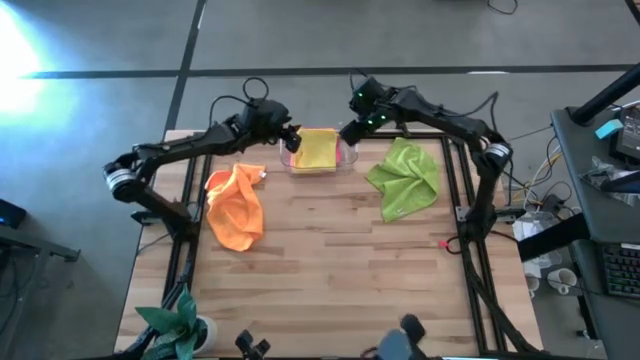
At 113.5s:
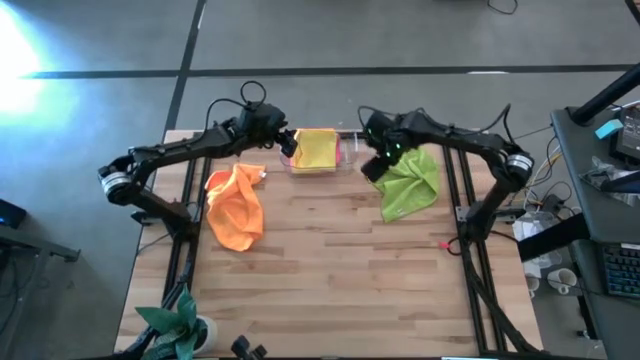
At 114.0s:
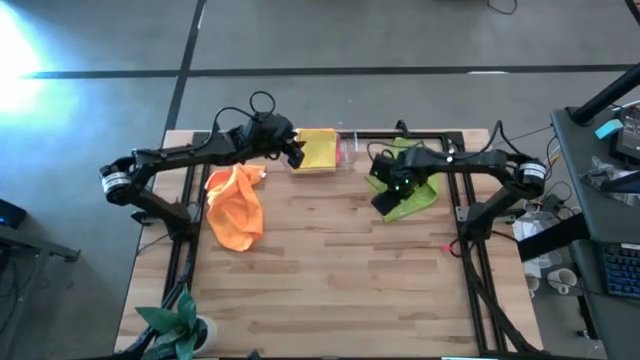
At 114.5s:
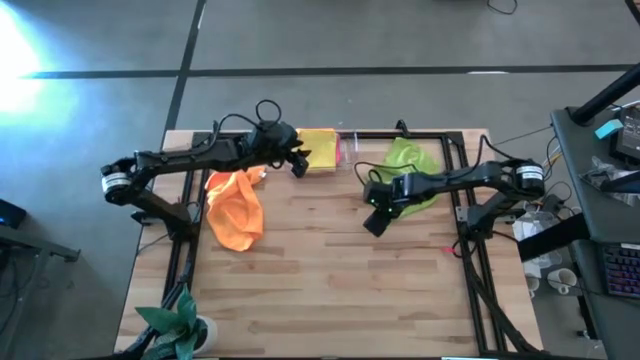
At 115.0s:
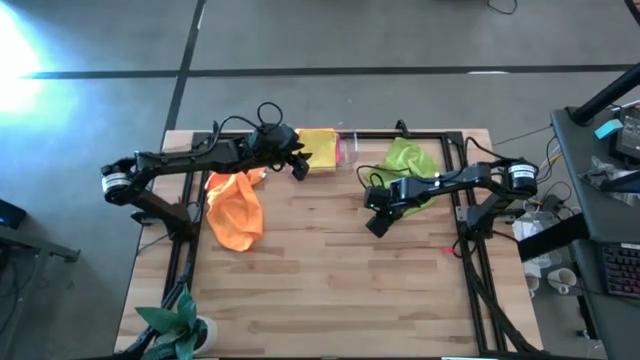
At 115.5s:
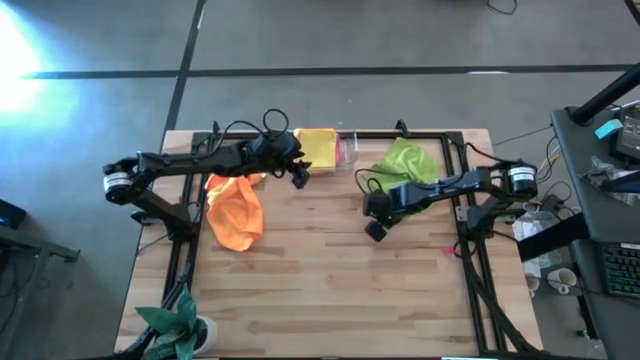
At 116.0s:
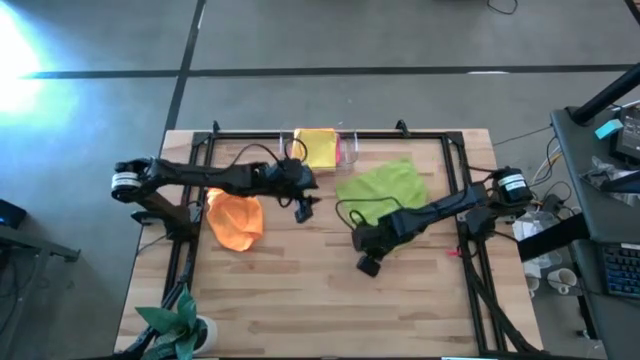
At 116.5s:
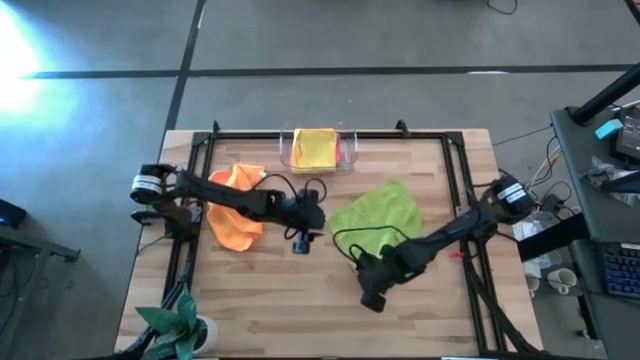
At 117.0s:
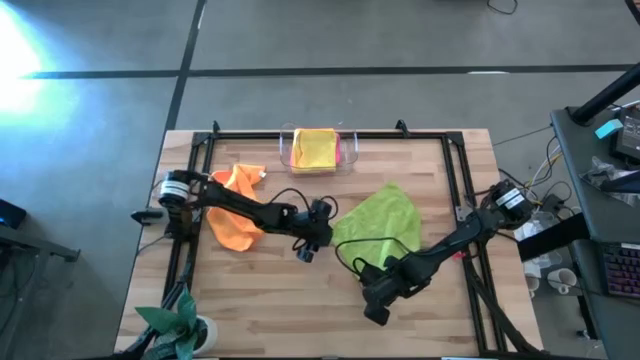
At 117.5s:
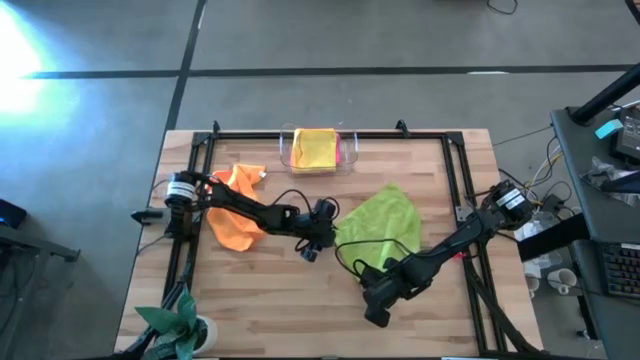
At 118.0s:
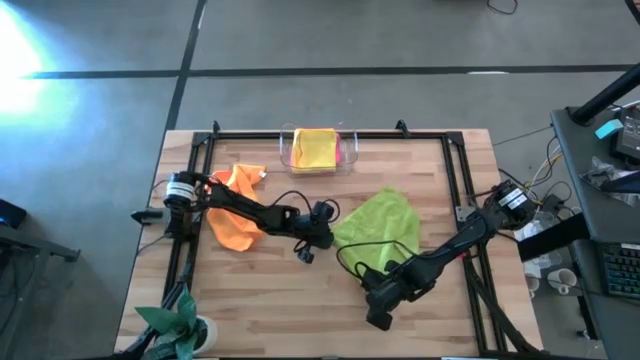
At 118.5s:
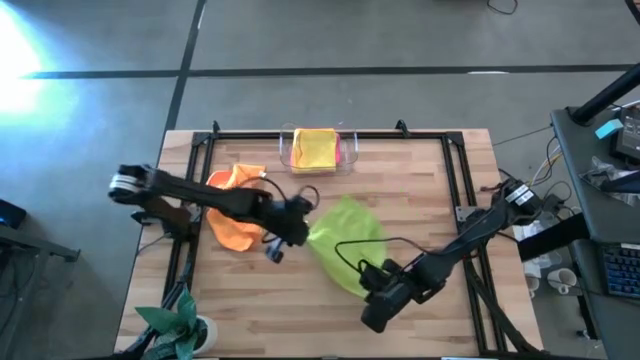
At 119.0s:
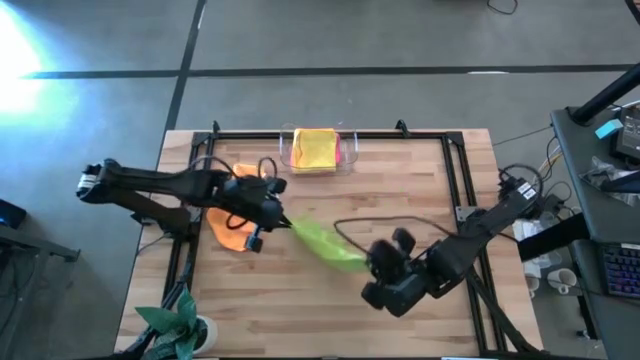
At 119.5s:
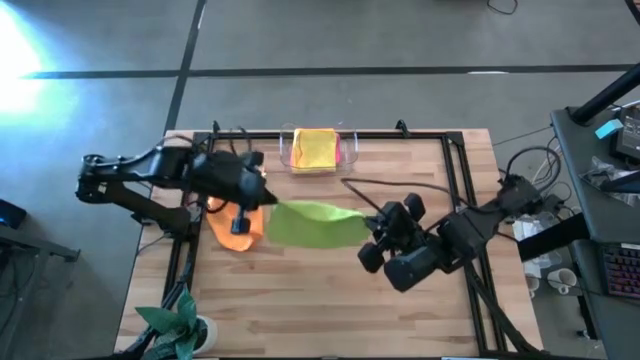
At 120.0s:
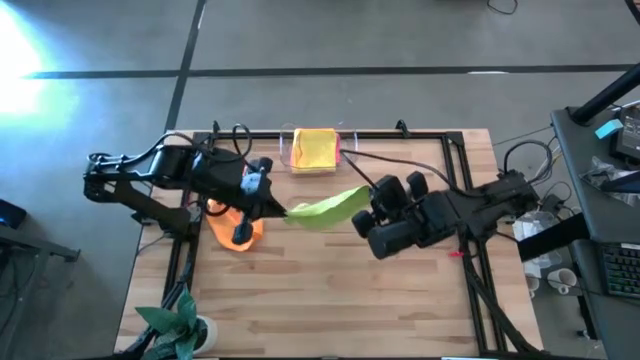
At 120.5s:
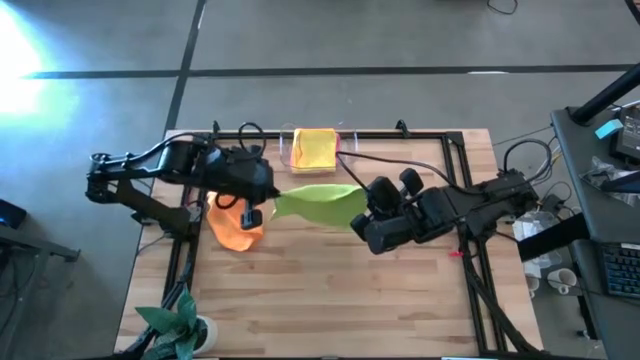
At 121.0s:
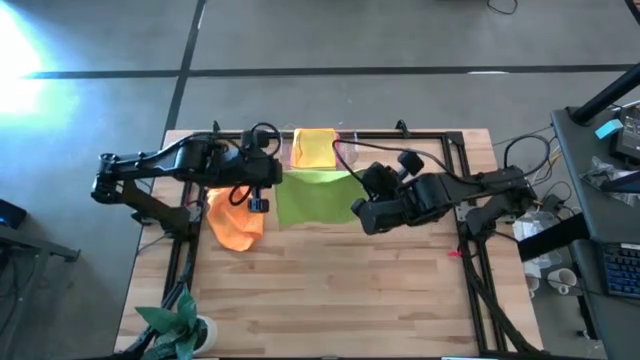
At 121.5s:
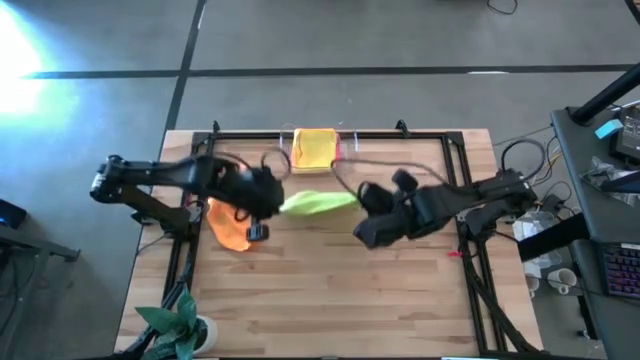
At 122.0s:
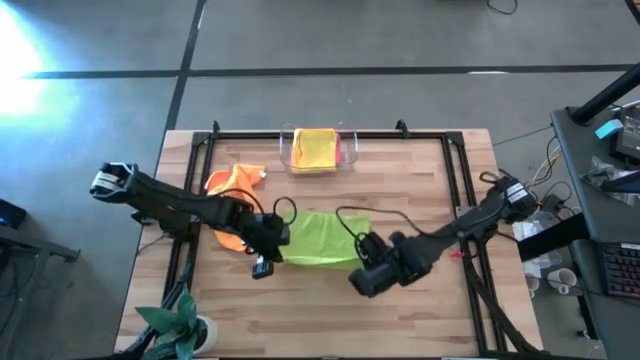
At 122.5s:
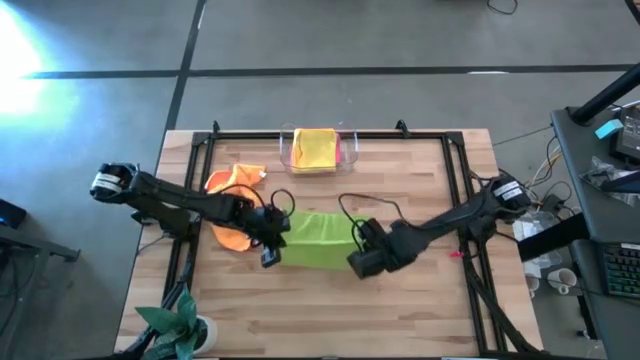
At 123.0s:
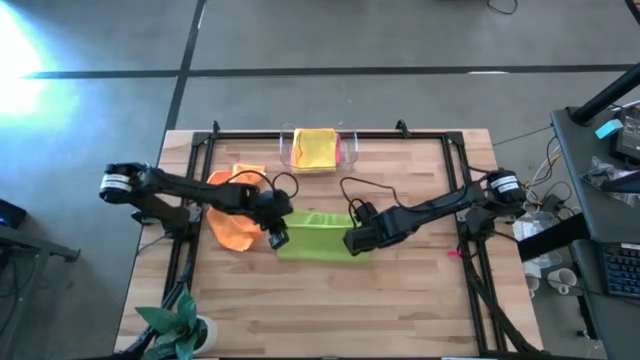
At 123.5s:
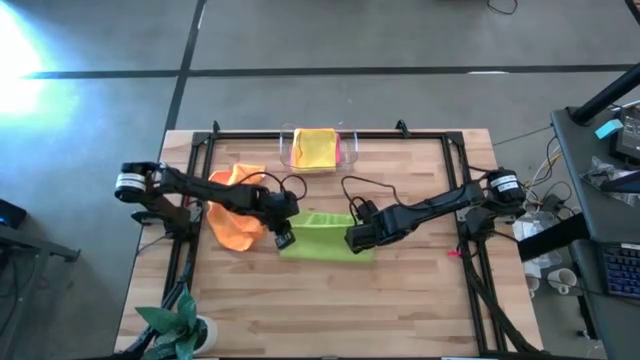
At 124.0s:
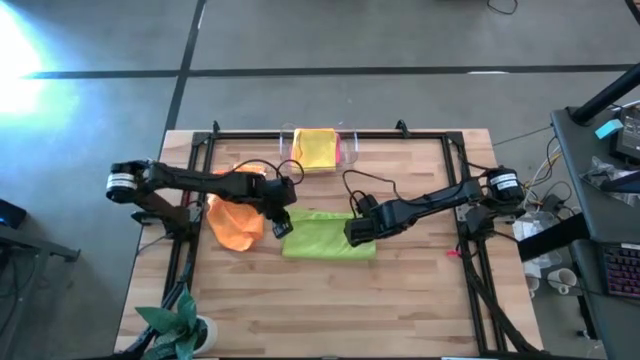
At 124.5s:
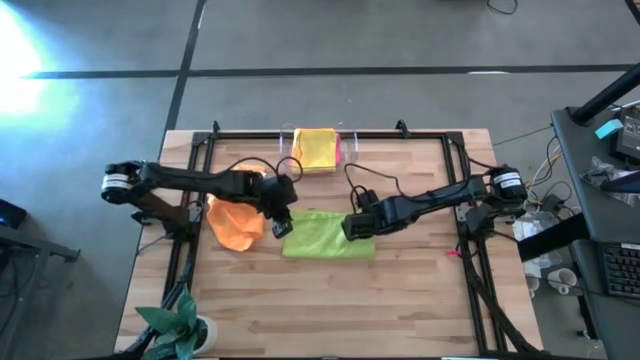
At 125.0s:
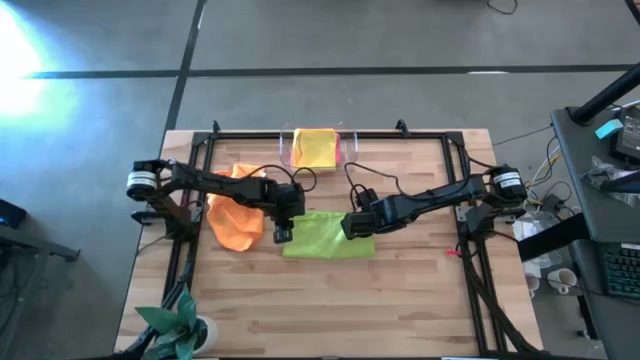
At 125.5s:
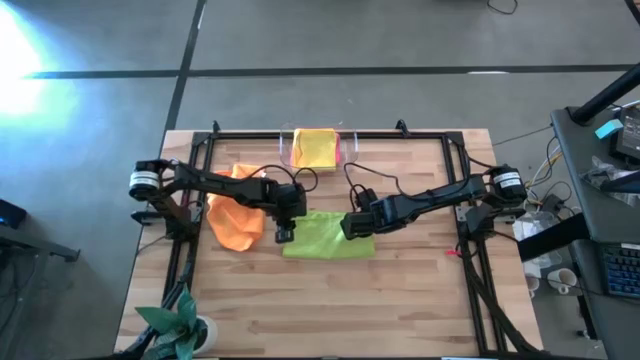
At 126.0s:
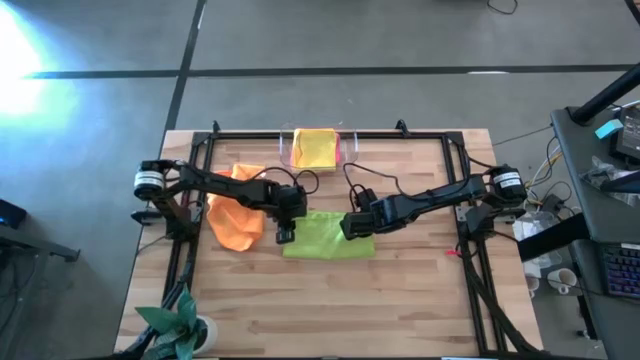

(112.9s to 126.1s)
Task: Fold microfiber towels
Fold the green microfiber cloth

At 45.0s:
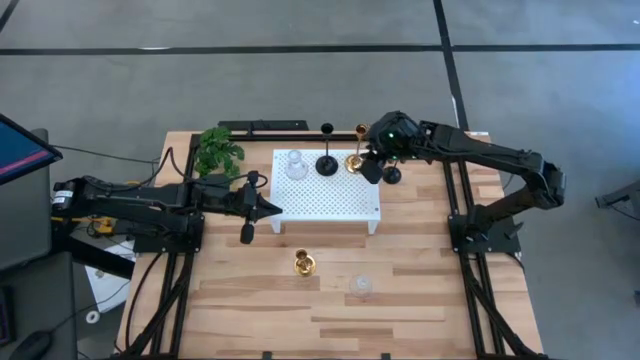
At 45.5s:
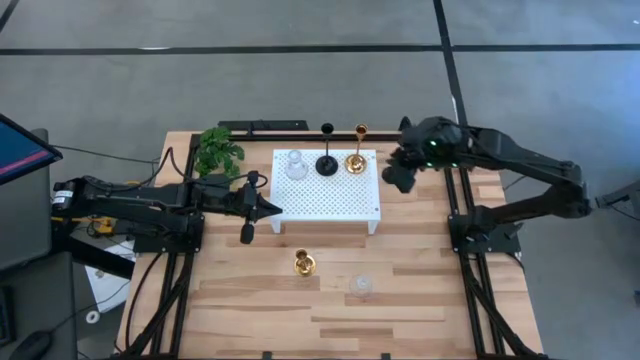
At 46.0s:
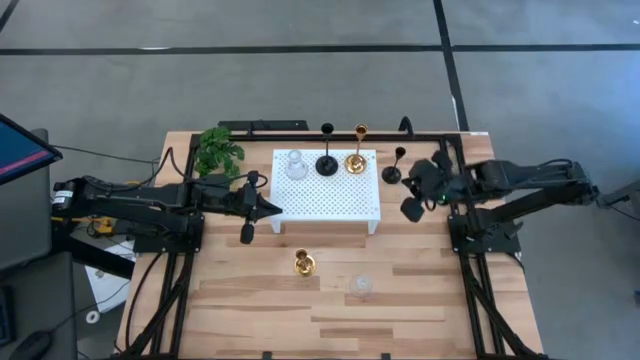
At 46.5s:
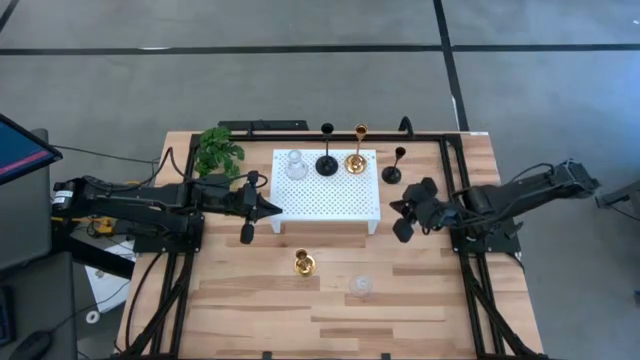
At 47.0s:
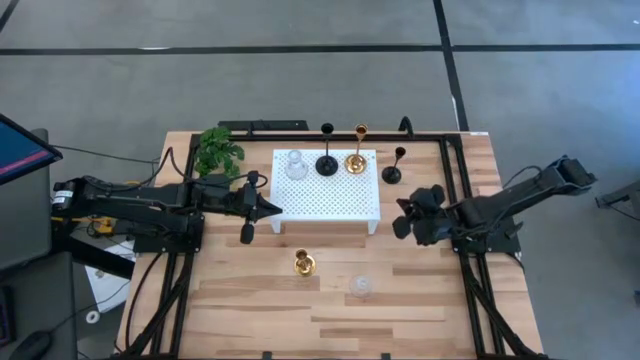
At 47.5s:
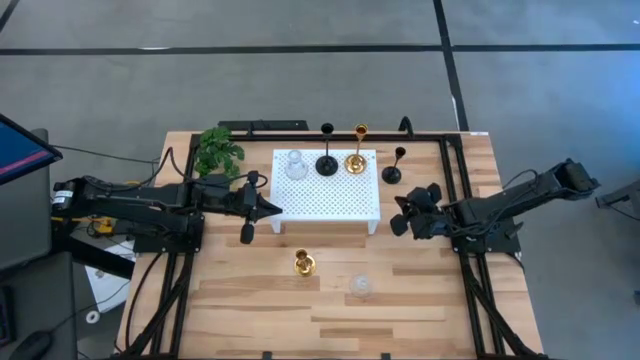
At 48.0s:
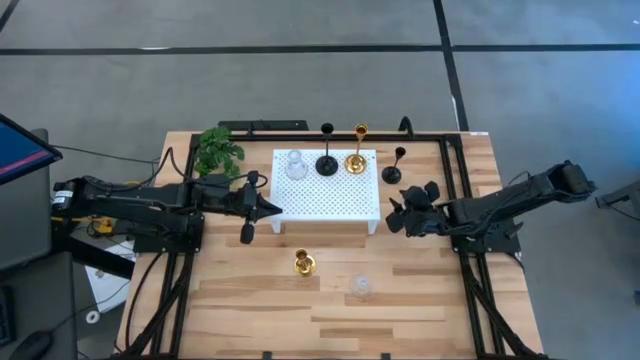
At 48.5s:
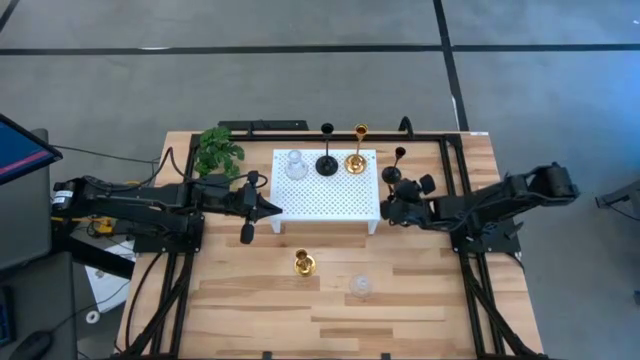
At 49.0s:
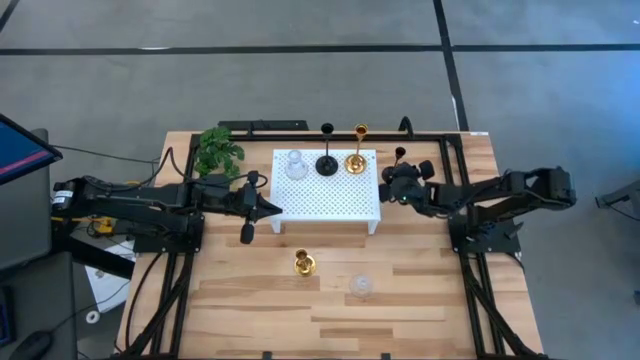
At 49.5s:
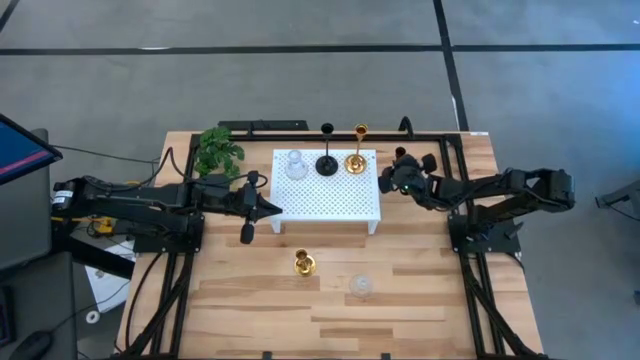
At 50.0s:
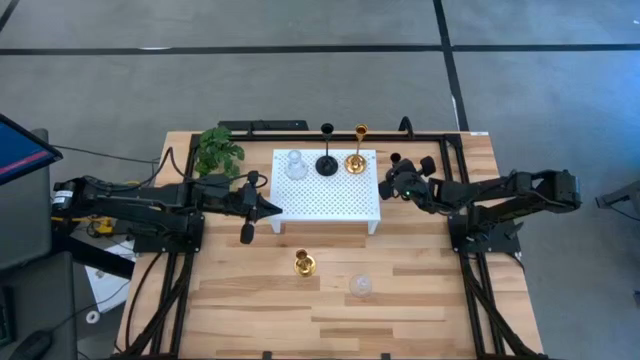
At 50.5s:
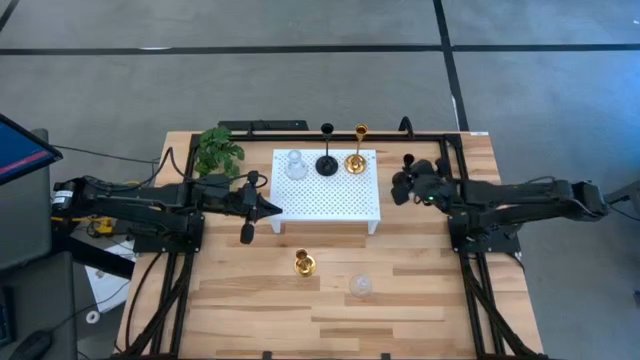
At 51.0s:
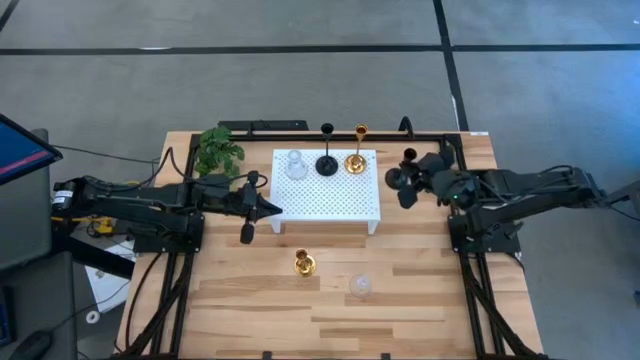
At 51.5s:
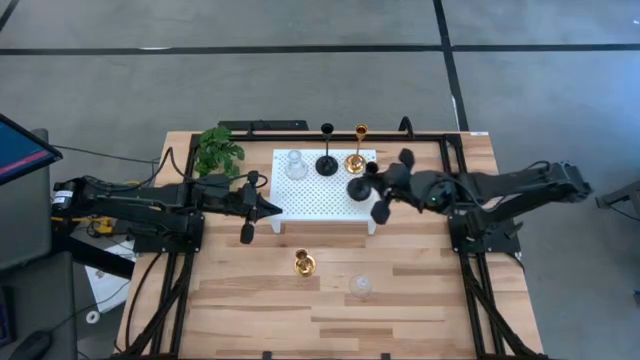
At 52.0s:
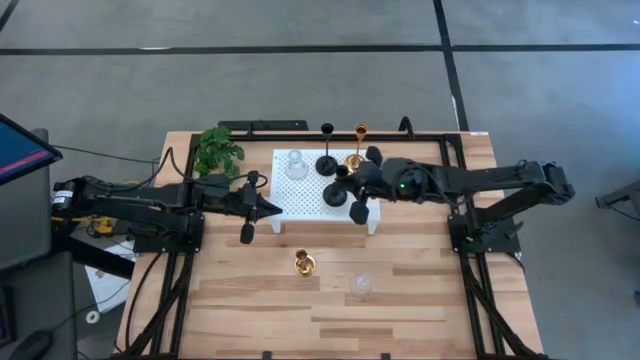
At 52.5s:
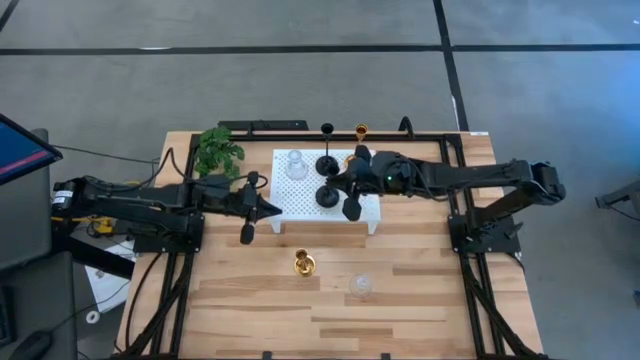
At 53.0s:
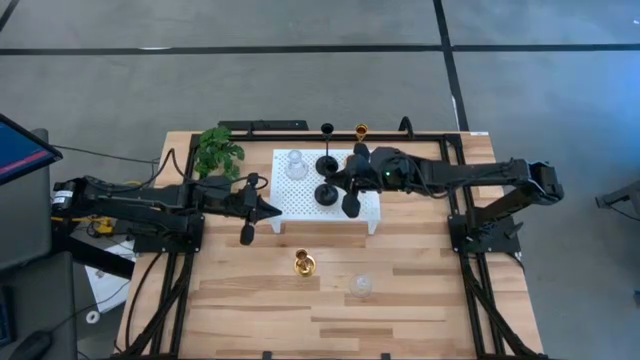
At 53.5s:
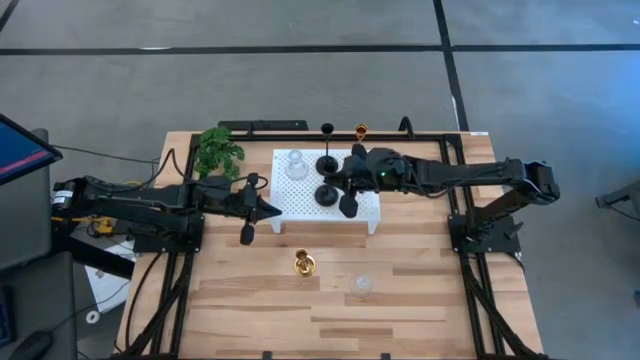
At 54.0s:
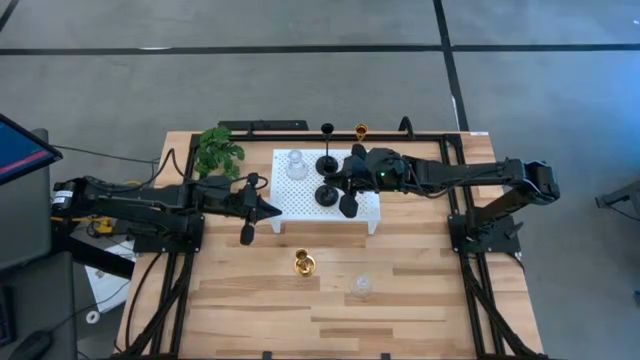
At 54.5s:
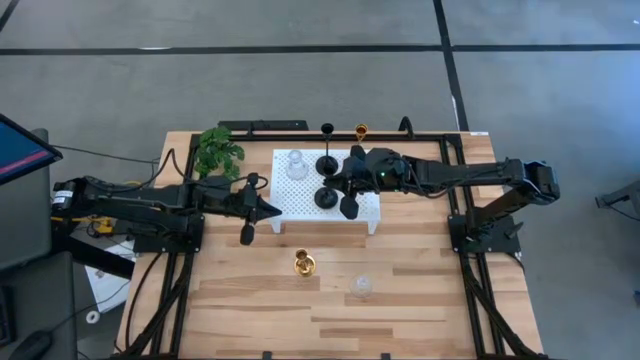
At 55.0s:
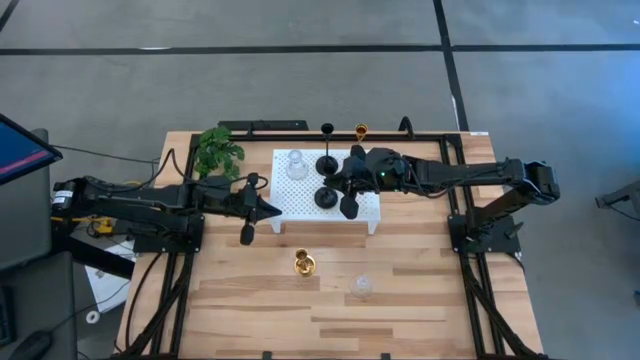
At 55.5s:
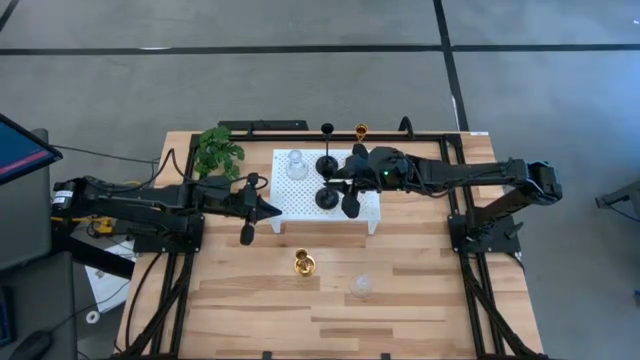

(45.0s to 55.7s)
Task: Pick & Place candle stick holders
Put the black candle holder aligned with the other black candle holder on the shelf
